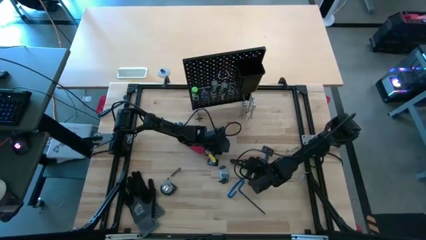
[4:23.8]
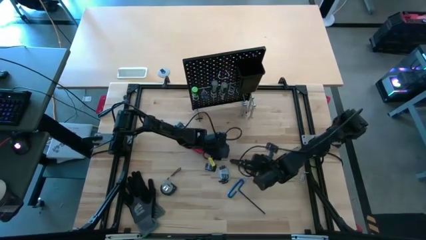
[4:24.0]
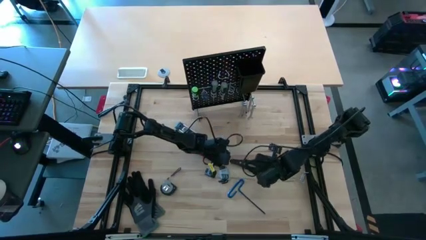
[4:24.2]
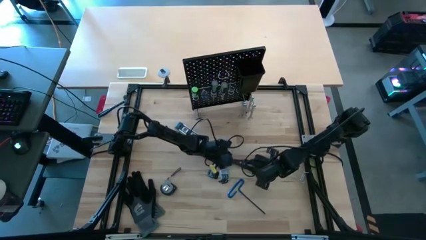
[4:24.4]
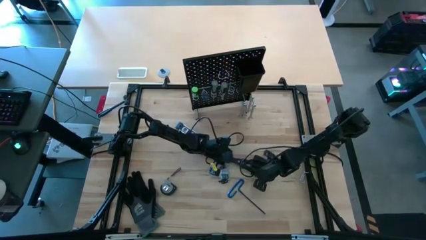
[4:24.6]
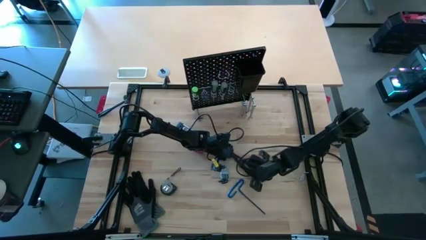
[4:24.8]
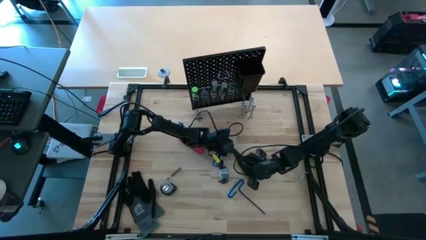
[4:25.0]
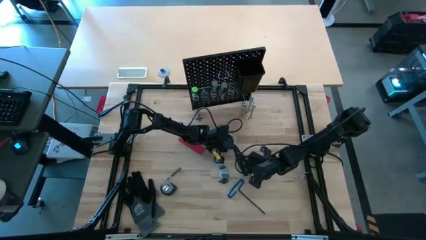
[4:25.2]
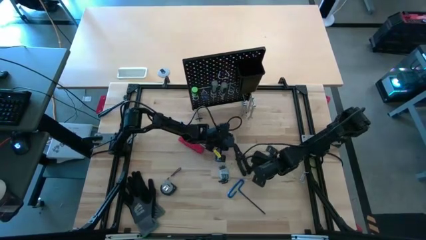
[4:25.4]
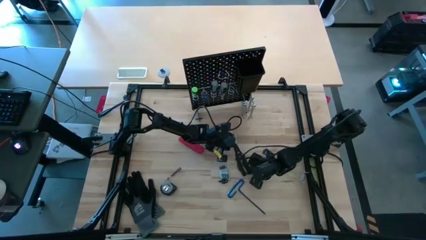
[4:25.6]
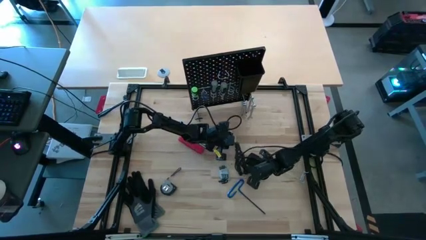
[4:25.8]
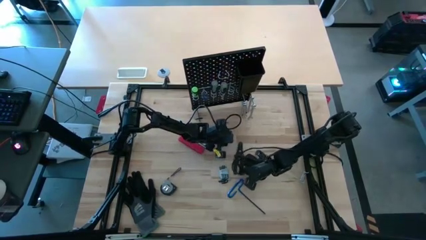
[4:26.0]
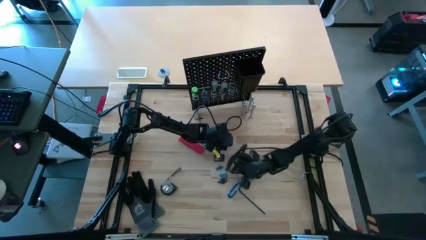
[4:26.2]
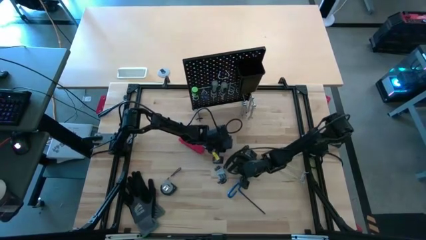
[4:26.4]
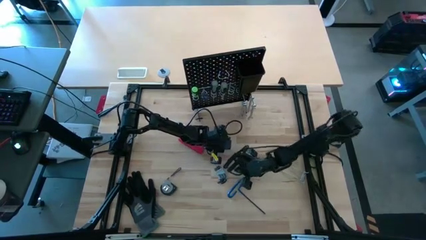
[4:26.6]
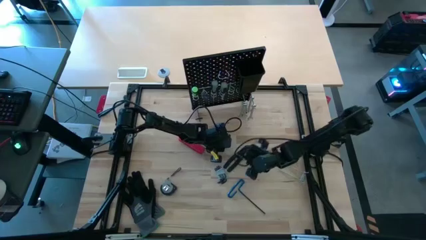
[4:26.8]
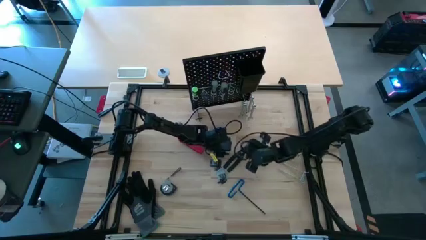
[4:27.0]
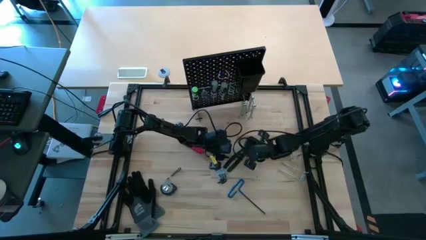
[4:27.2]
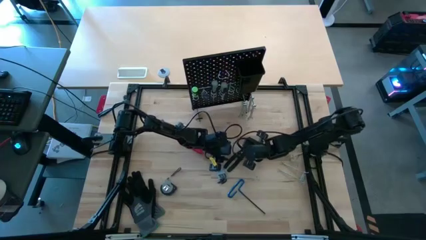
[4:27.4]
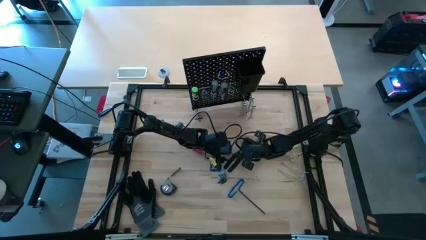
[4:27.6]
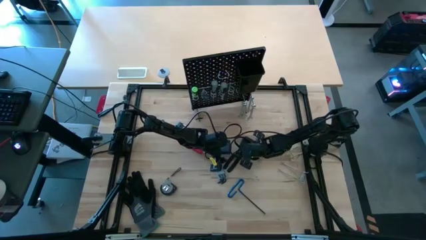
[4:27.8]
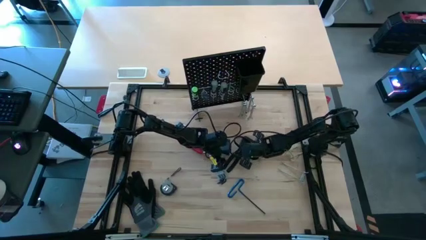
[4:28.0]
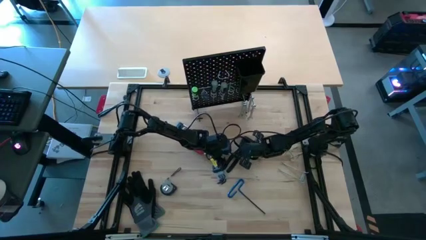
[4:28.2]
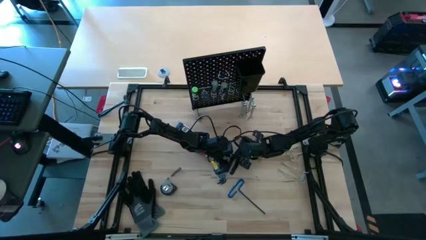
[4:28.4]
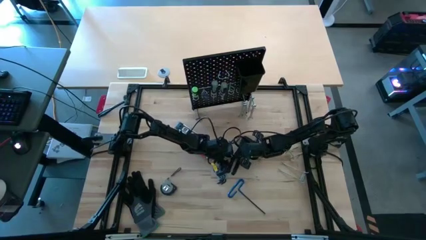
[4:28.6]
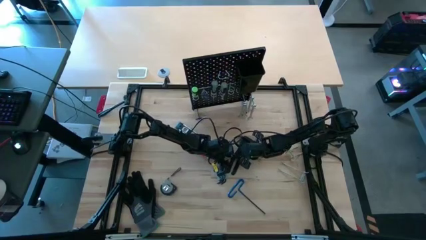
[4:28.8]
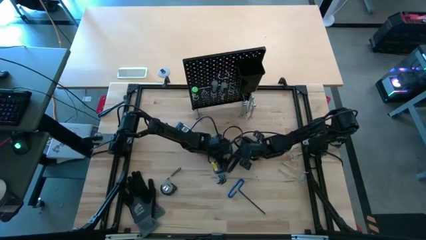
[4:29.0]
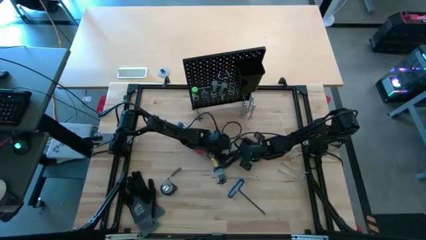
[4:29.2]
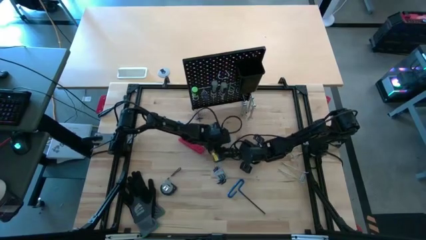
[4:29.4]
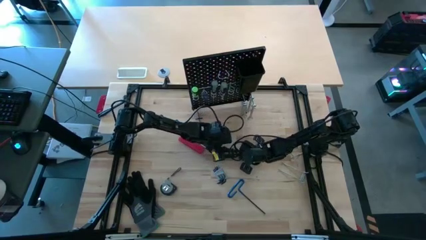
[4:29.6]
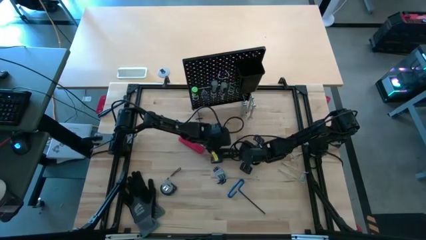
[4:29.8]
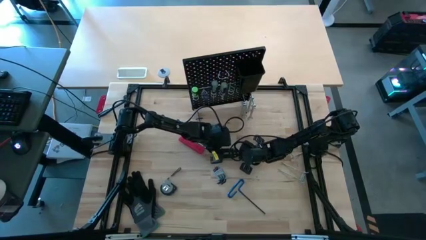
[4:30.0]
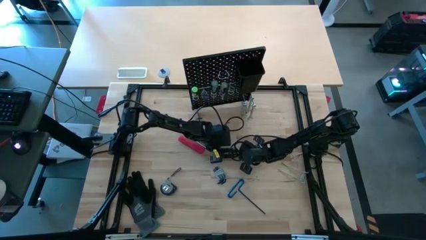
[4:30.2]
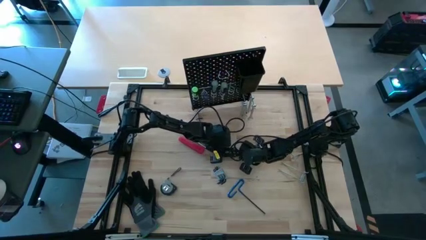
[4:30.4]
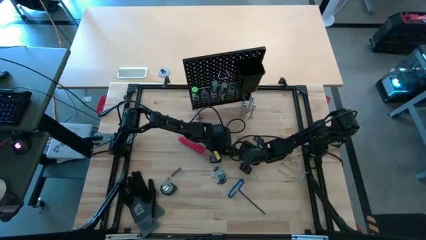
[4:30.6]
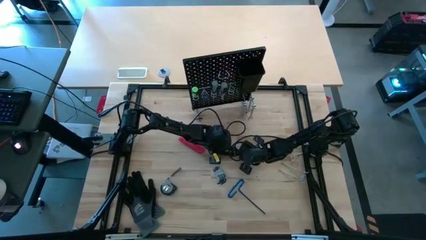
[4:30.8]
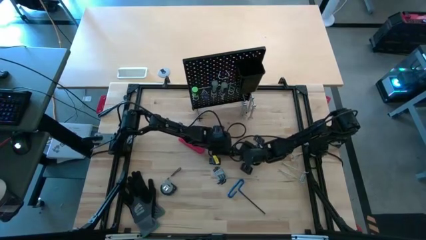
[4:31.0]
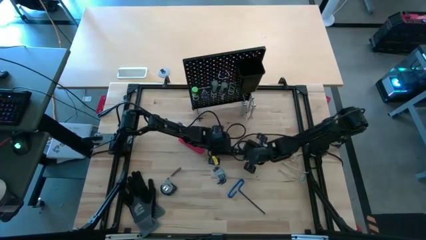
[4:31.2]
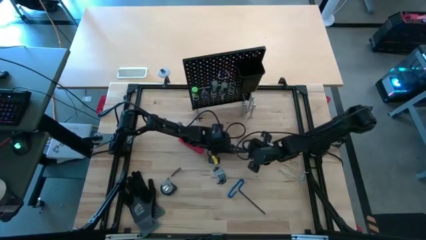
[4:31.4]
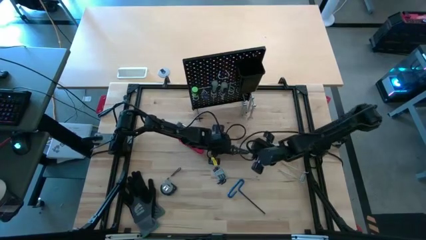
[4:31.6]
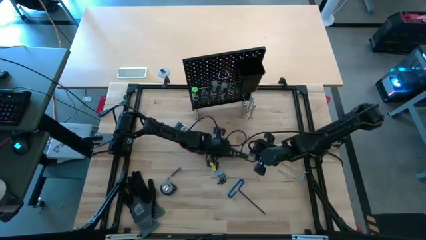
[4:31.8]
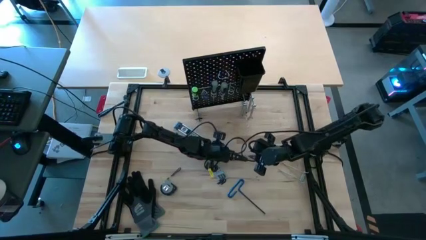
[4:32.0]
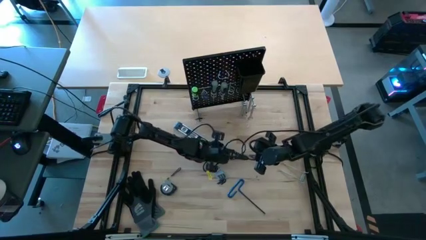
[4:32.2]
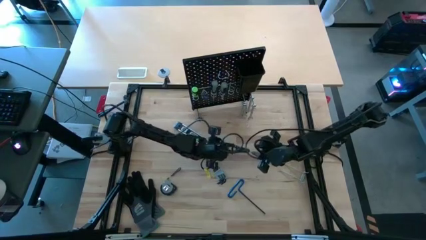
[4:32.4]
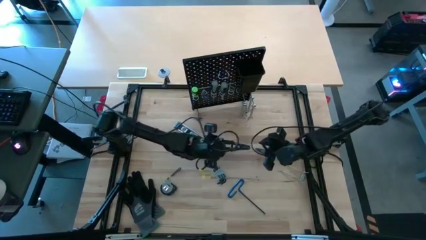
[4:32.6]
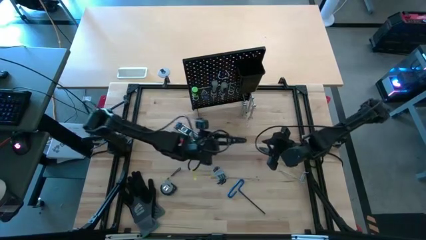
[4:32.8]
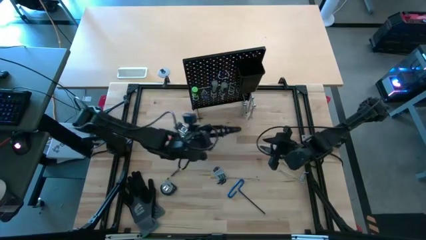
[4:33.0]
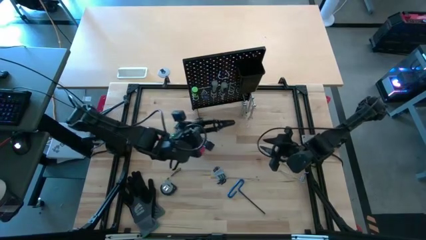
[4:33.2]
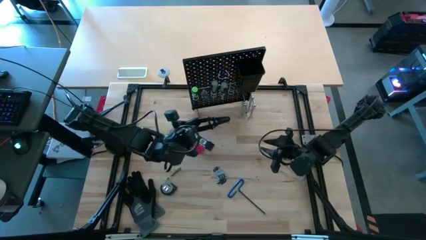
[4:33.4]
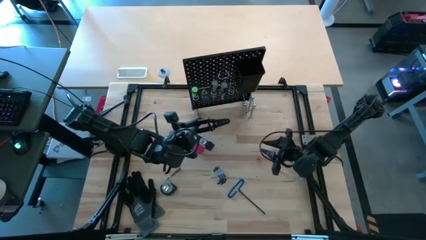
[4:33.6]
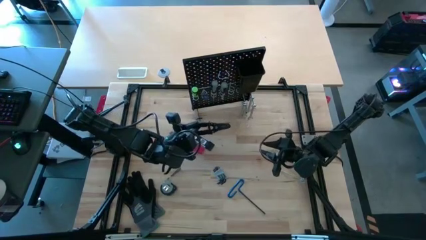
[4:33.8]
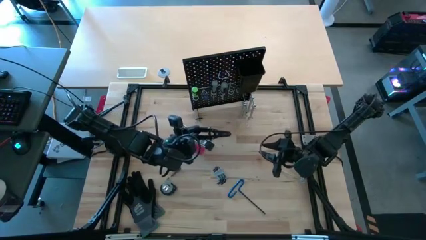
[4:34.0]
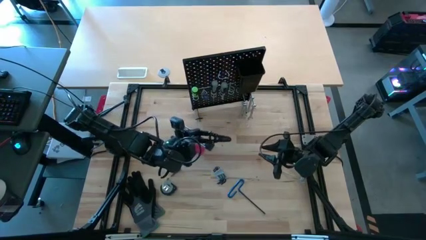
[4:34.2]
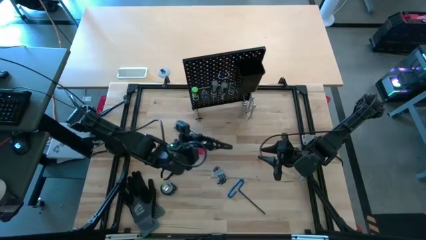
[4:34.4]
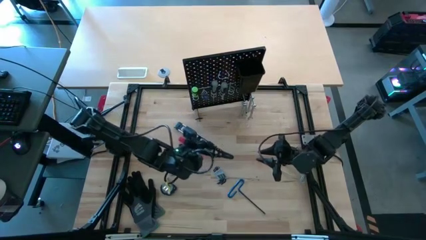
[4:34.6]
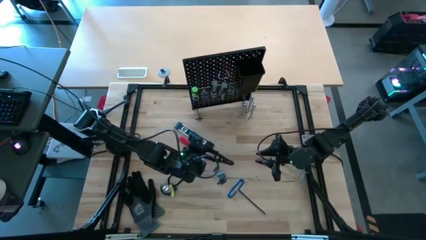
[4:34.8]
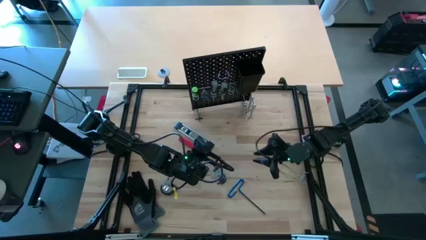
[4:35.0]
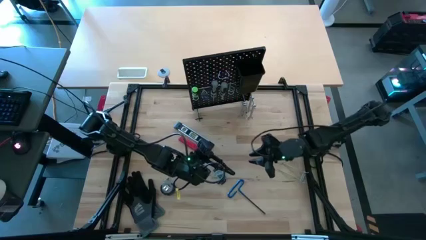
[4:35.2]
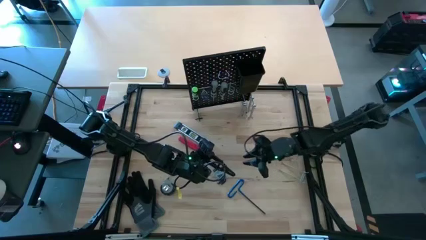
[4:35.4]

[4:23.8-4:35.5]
Task: Hang tools onto peg board
Hang the black wire stripper onto the pegboard

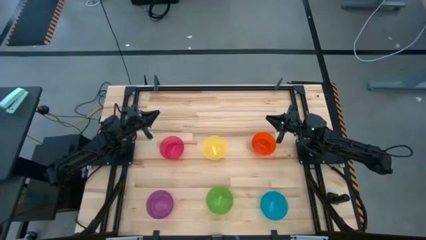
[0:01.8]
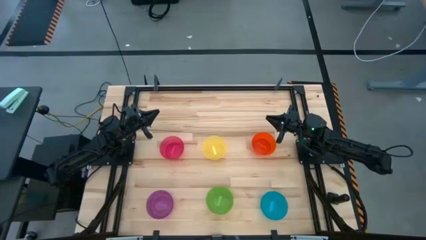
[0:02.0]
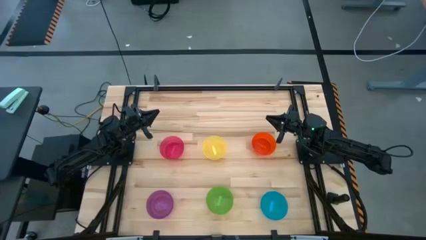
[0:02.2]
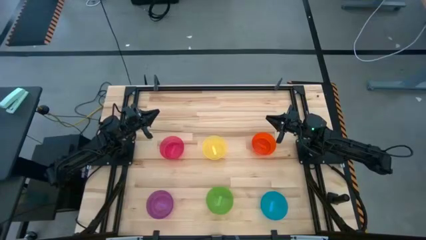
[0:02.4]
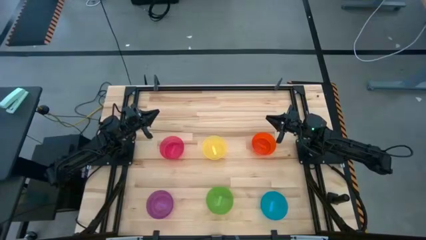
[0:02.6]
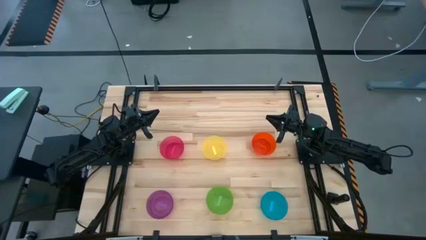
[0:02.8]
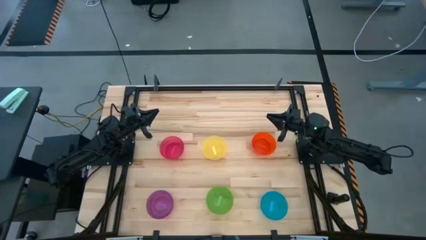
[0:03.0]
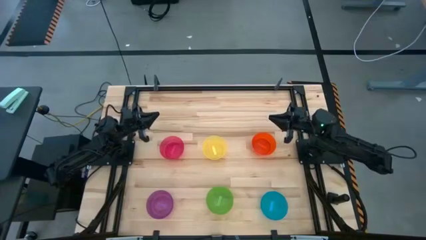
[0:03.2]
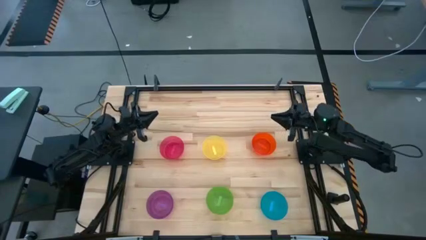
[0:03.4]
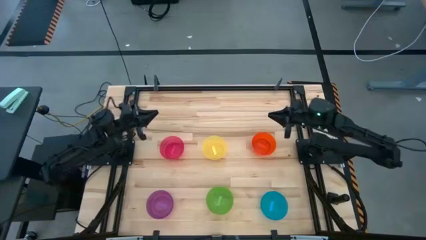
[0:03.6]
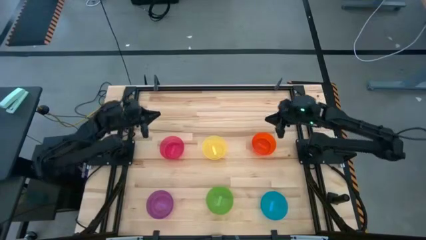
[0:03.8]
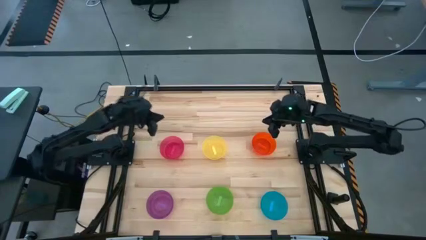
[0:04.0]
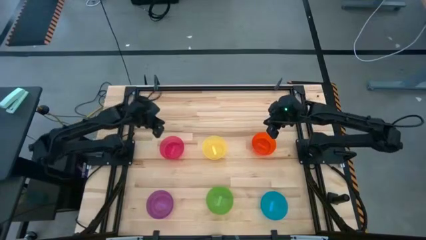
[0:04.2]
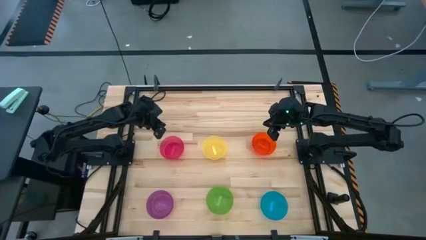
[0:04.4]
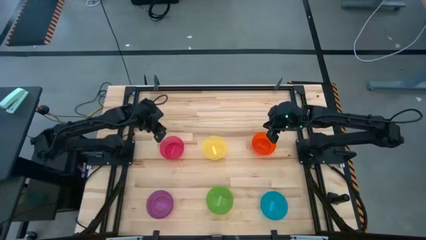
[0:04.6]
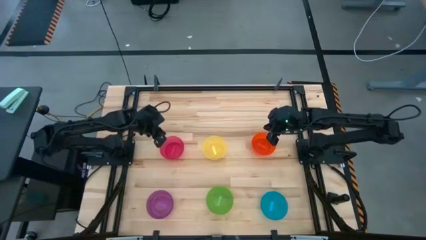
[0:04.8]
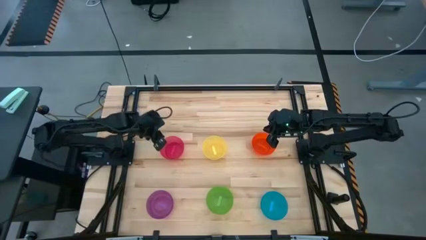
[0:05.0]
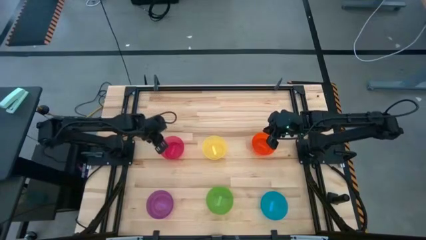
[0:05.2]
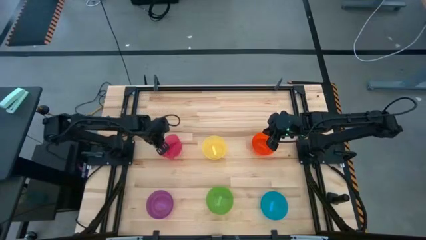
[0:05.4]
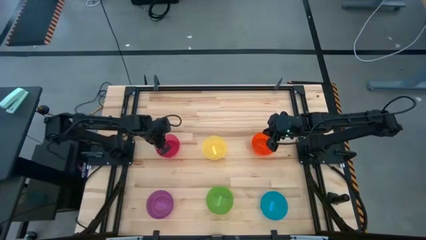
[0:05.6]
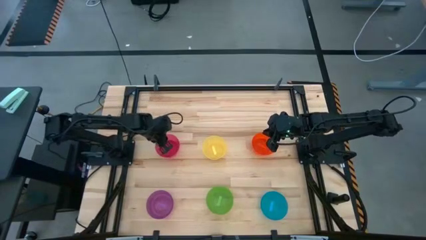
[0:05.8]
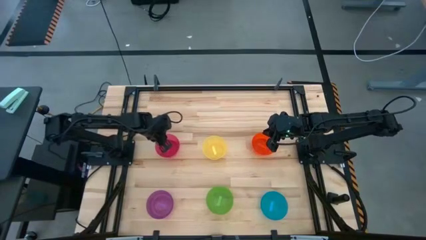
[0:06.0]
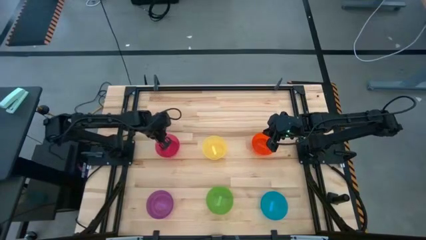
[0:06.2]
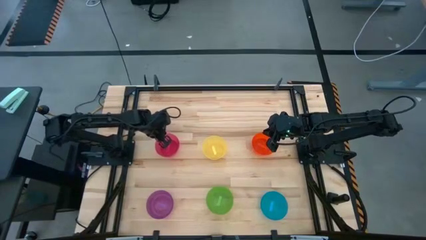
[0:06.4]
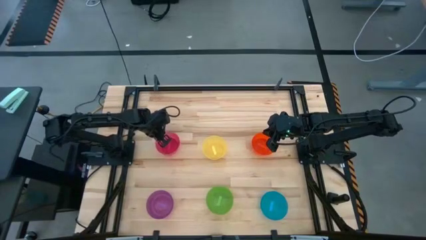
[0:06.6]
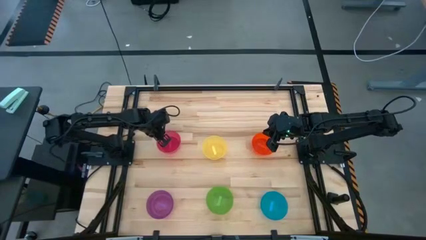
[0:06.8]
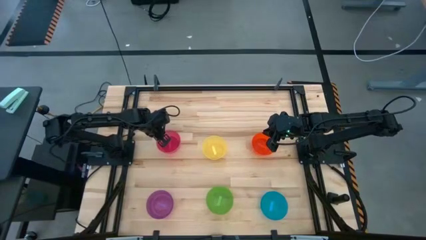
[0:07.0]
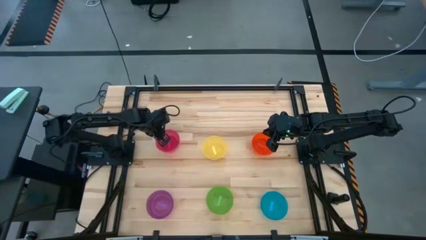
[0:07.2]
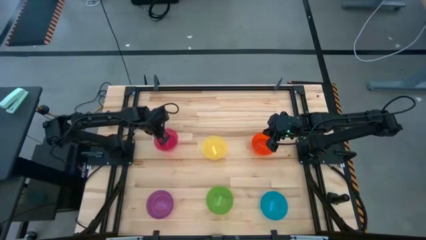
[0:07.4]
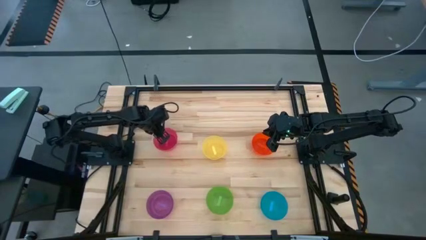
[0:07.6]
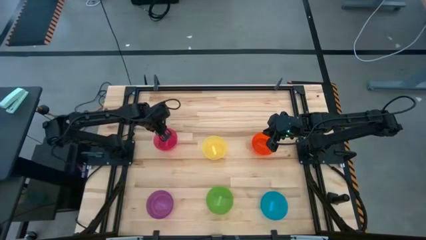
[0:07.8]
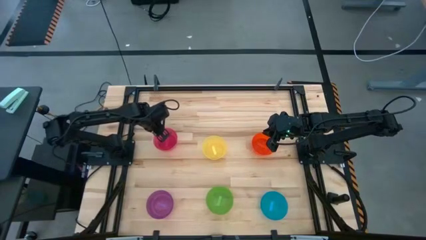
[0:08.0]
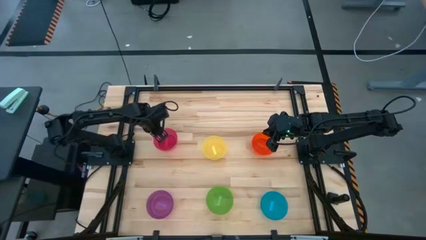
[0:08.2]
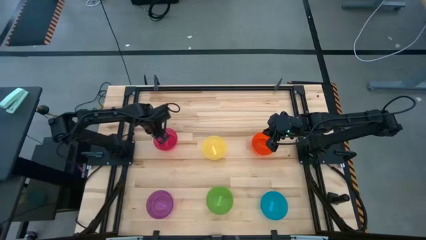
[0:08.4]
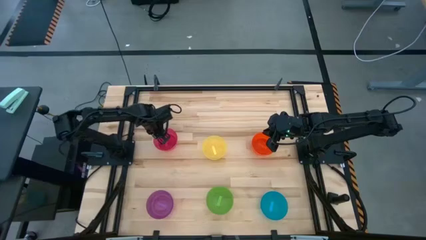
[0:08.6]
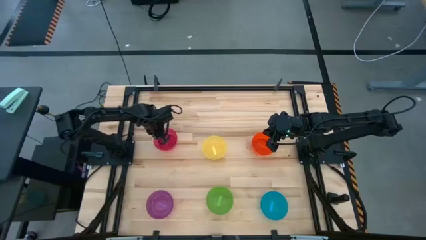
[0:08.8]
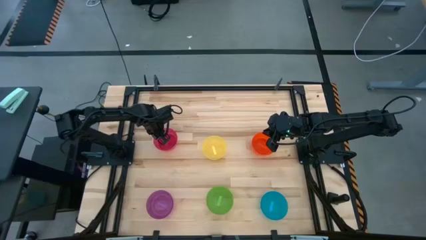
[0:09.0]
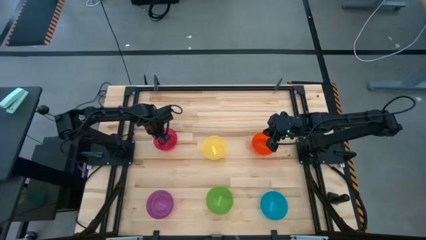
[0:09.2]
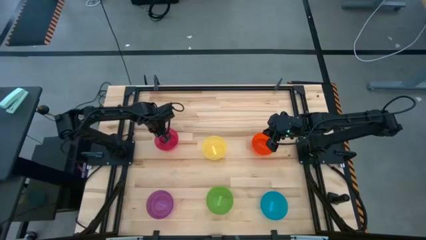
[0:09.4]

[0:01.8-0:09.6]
Task: Nest bowls inside each other
Stack the red bowl on top of the yellow bowl
